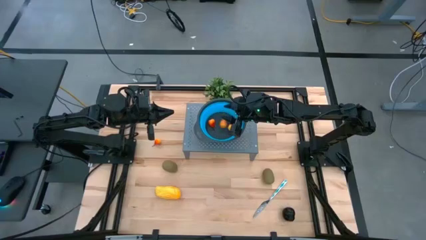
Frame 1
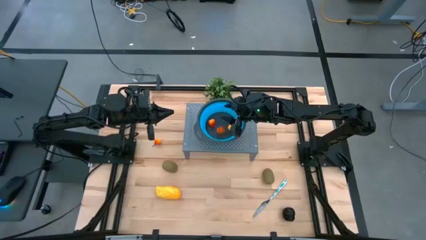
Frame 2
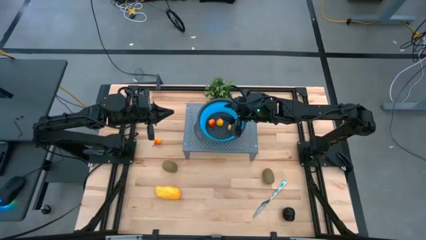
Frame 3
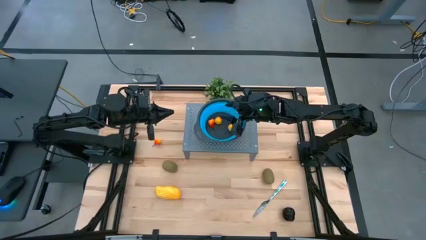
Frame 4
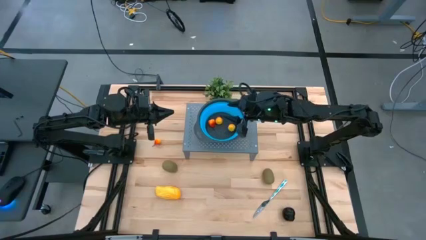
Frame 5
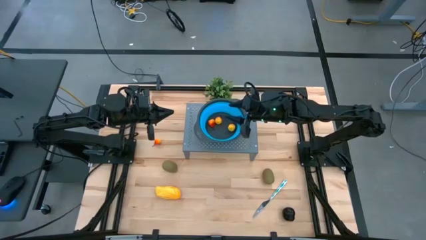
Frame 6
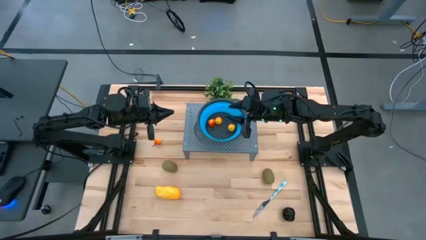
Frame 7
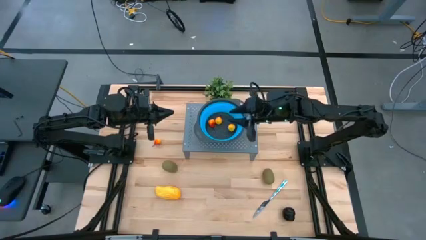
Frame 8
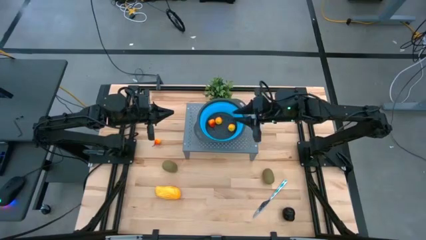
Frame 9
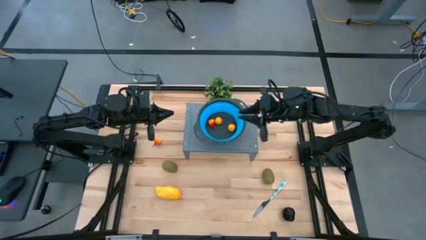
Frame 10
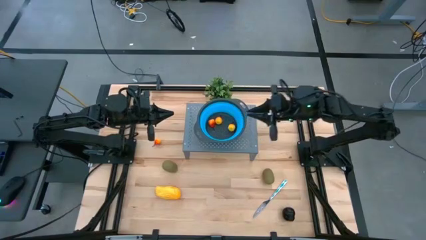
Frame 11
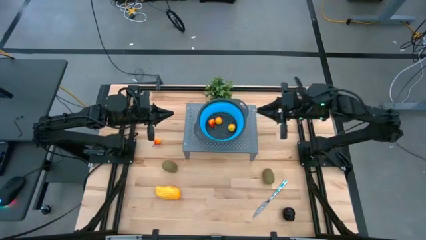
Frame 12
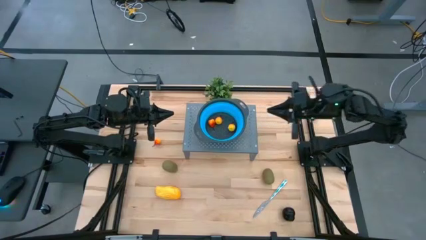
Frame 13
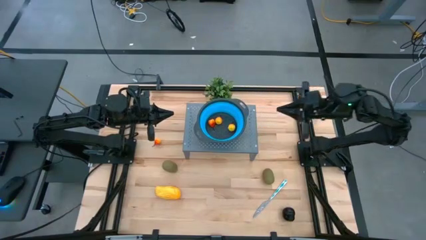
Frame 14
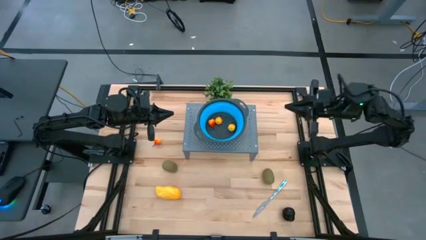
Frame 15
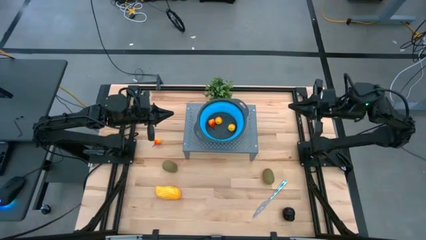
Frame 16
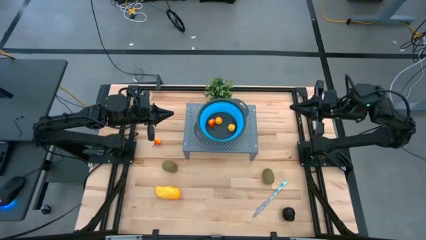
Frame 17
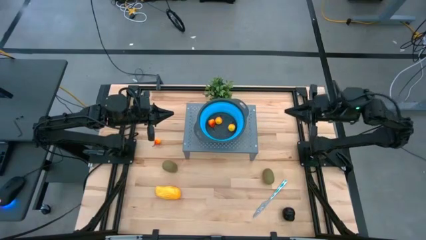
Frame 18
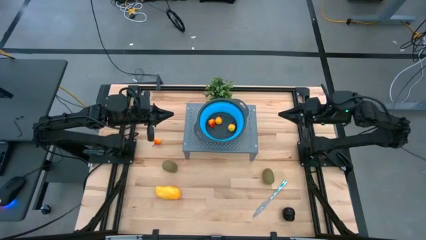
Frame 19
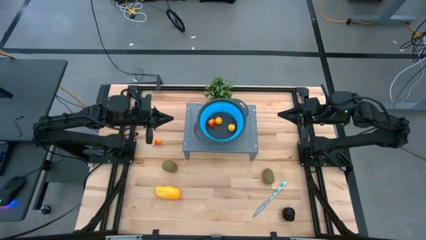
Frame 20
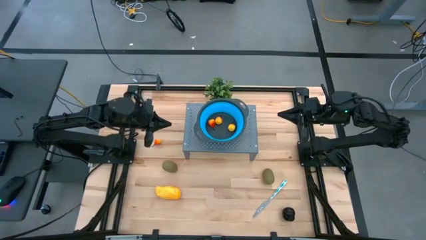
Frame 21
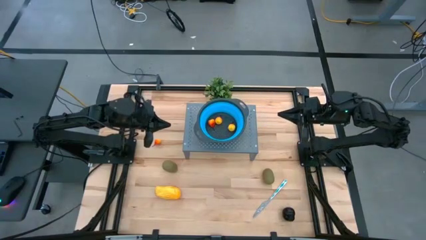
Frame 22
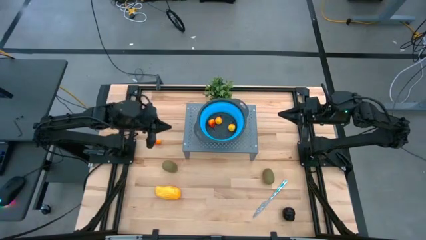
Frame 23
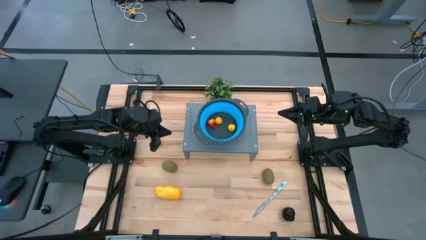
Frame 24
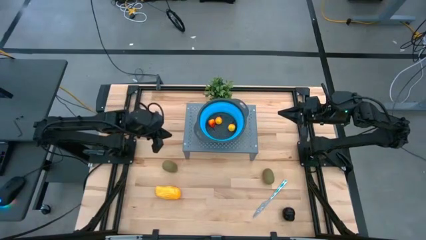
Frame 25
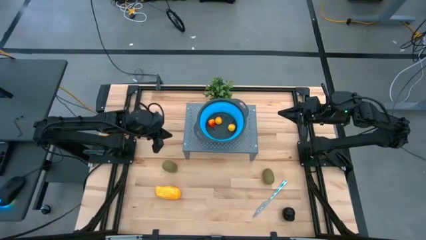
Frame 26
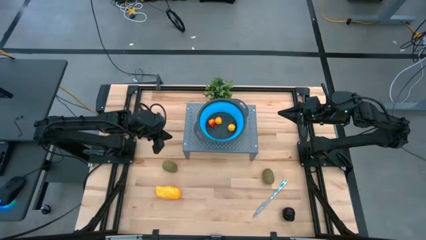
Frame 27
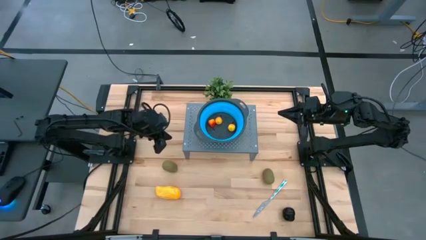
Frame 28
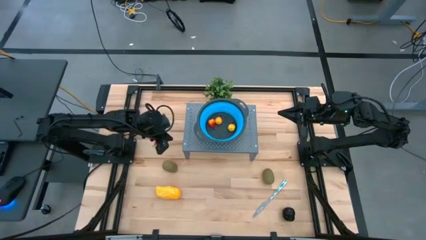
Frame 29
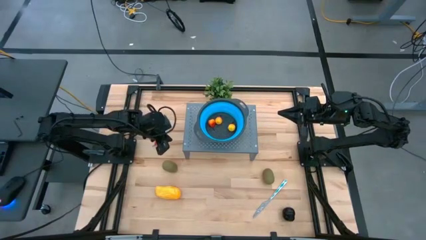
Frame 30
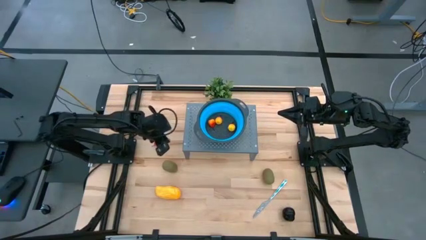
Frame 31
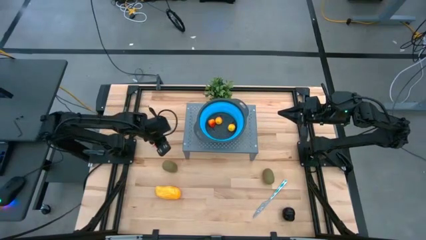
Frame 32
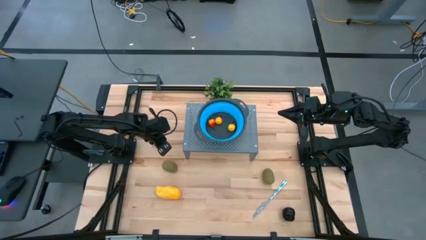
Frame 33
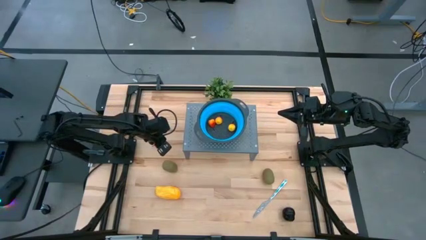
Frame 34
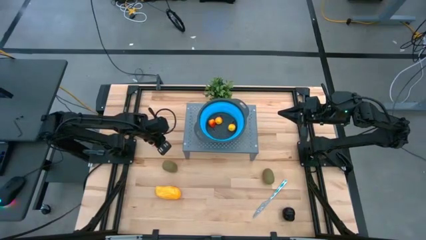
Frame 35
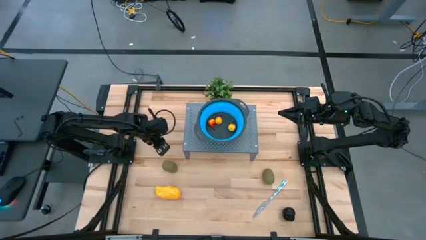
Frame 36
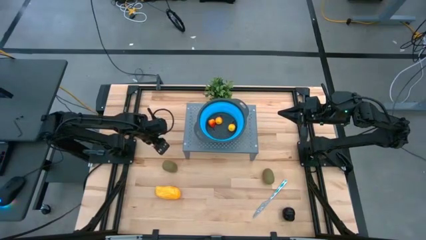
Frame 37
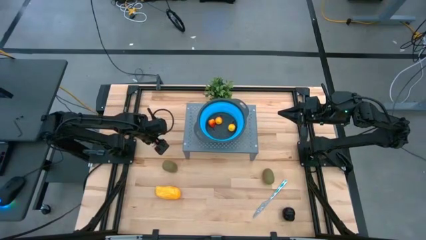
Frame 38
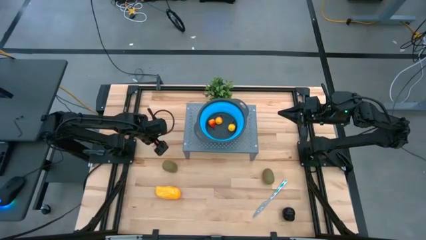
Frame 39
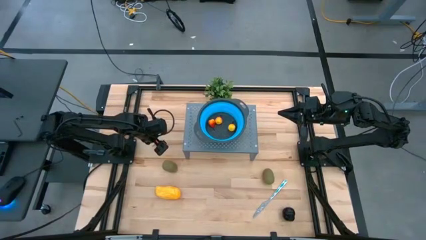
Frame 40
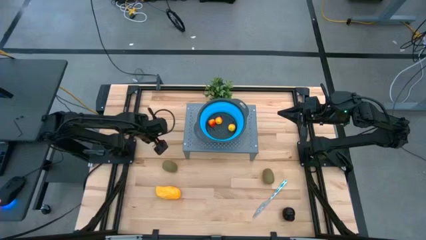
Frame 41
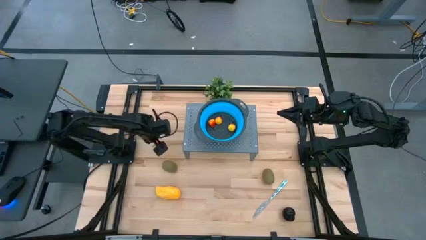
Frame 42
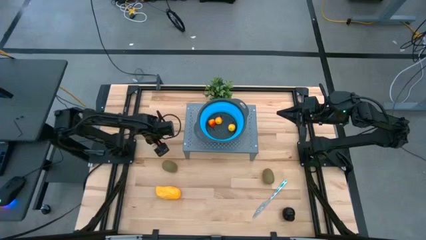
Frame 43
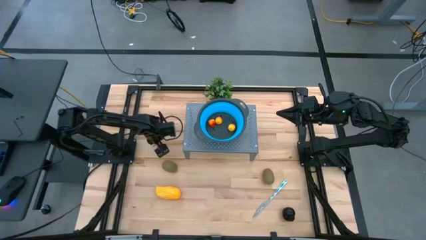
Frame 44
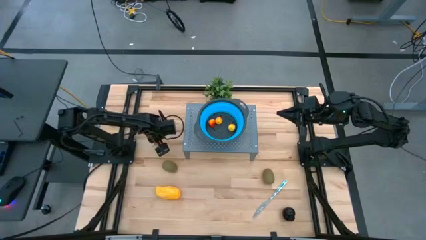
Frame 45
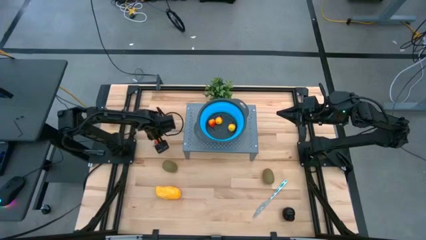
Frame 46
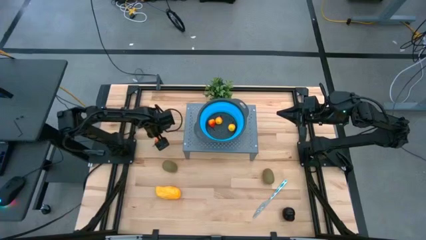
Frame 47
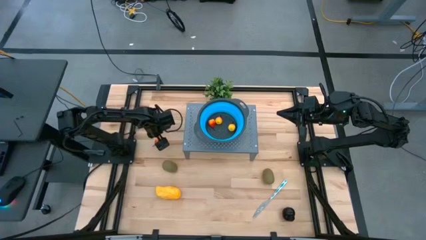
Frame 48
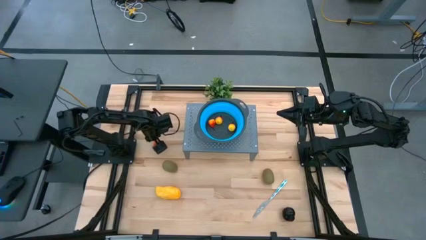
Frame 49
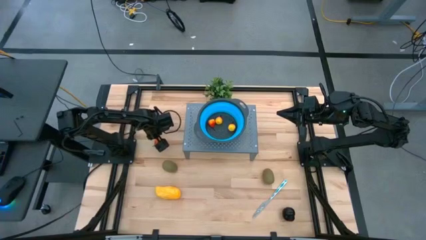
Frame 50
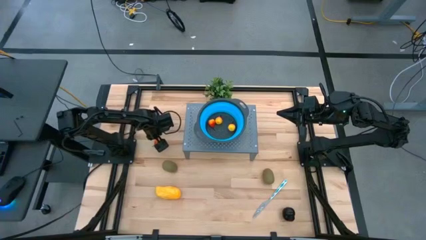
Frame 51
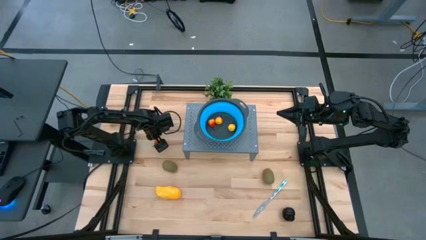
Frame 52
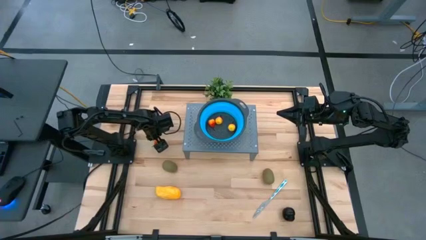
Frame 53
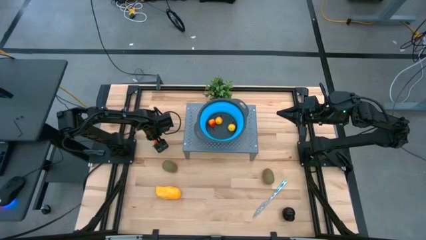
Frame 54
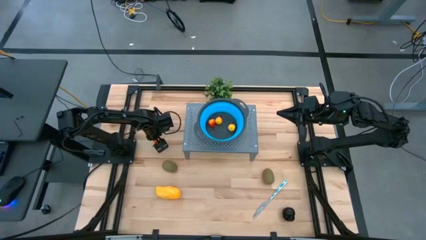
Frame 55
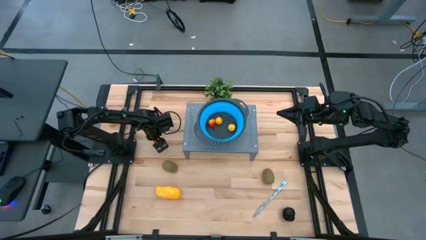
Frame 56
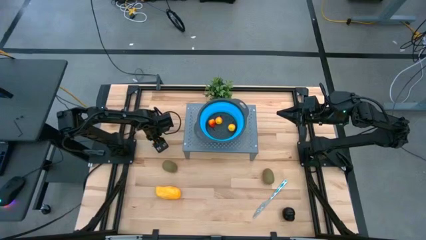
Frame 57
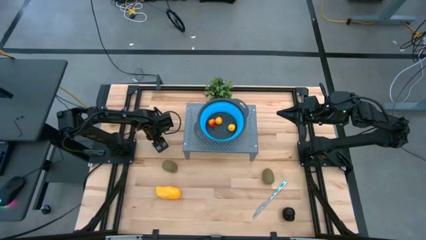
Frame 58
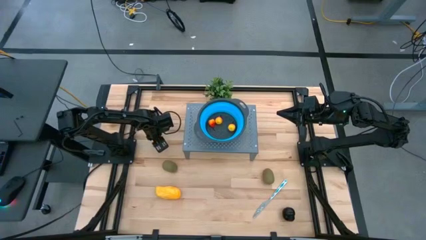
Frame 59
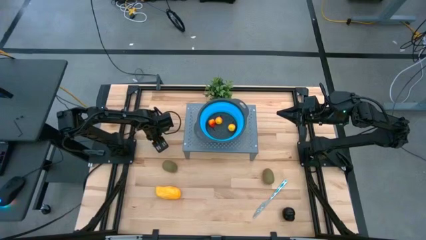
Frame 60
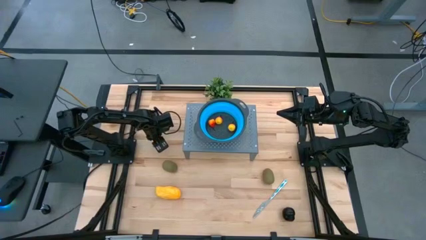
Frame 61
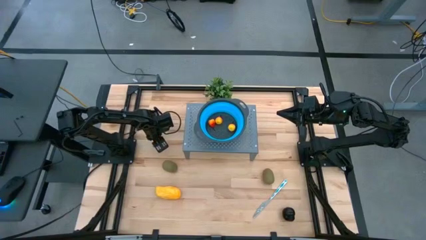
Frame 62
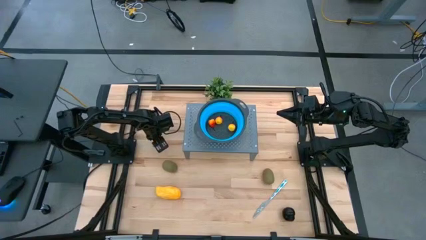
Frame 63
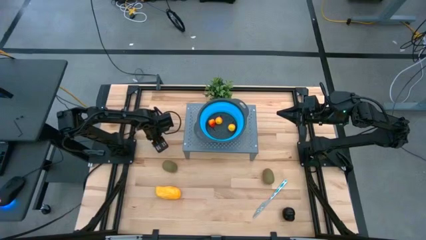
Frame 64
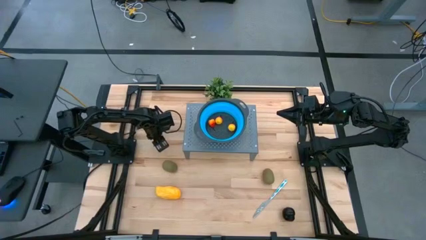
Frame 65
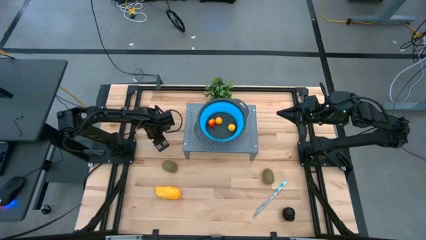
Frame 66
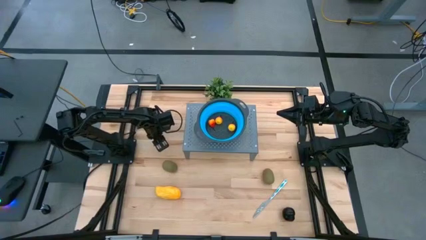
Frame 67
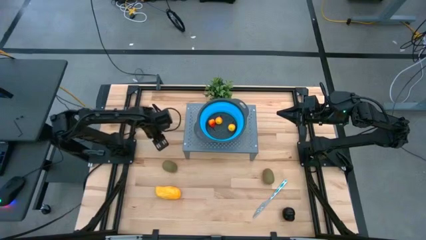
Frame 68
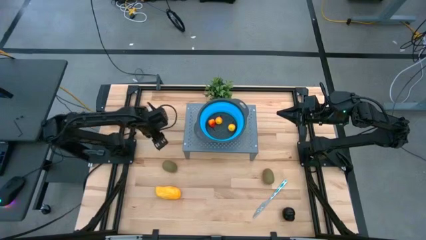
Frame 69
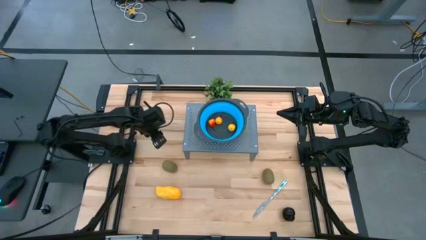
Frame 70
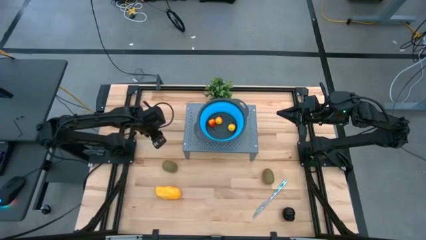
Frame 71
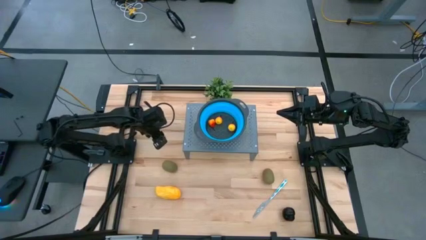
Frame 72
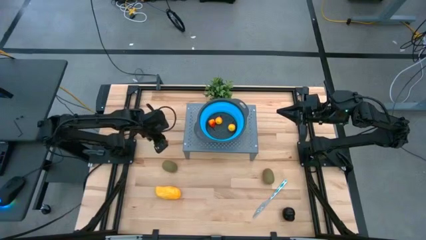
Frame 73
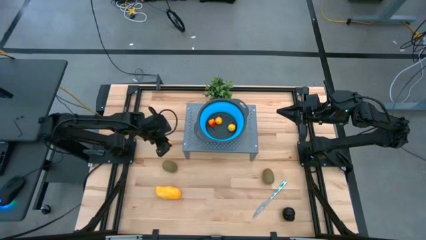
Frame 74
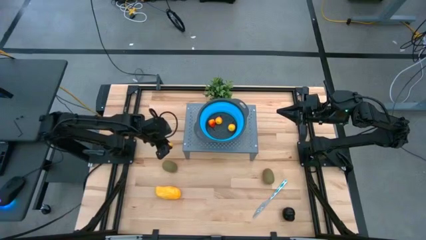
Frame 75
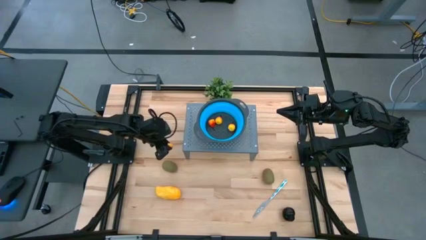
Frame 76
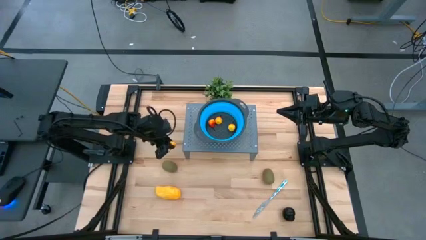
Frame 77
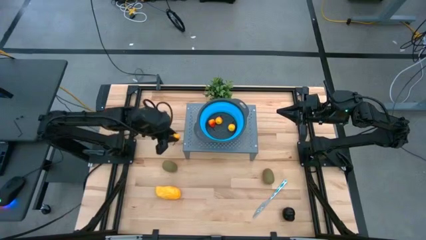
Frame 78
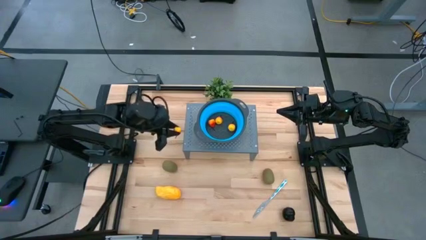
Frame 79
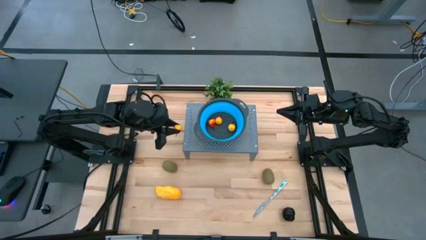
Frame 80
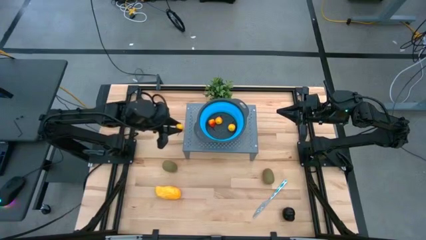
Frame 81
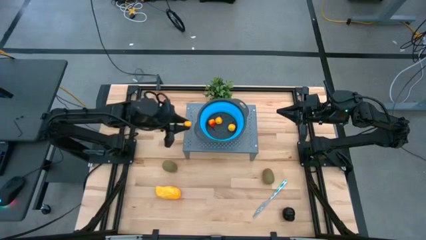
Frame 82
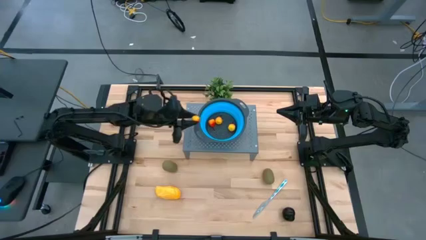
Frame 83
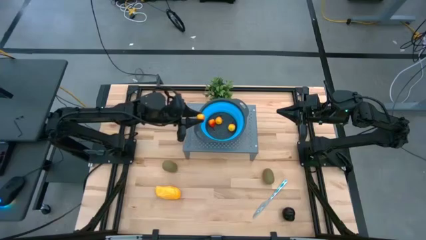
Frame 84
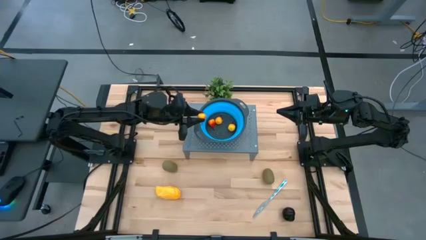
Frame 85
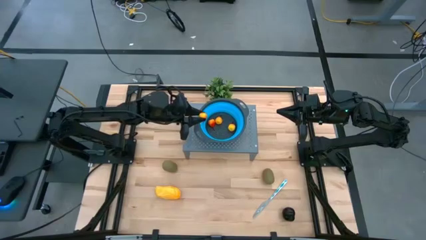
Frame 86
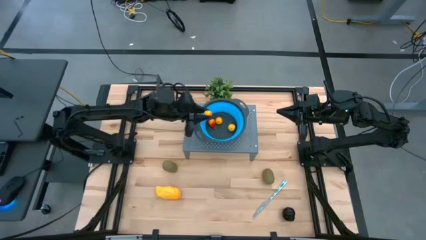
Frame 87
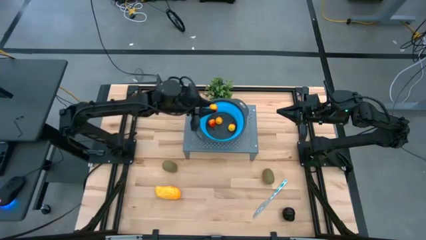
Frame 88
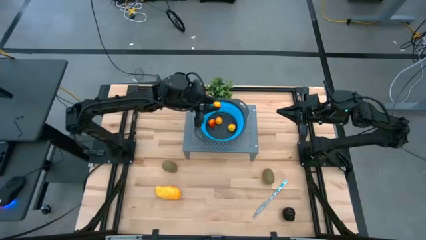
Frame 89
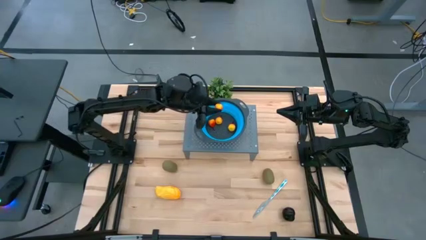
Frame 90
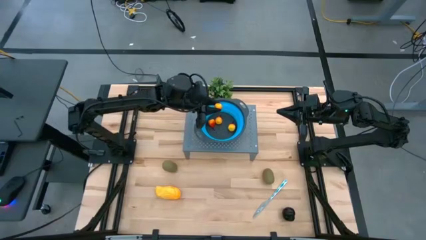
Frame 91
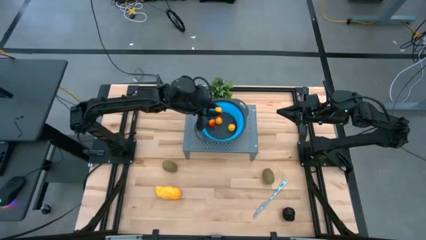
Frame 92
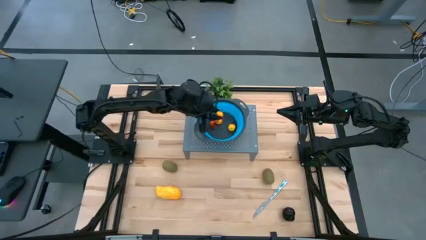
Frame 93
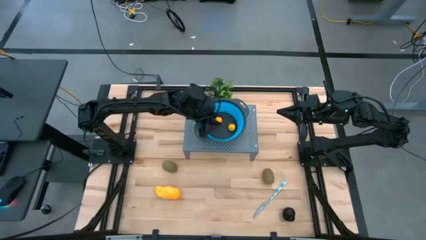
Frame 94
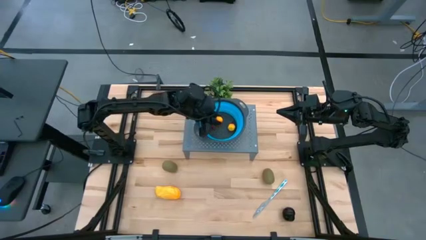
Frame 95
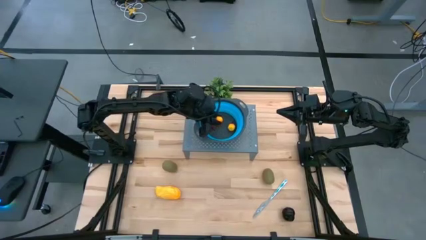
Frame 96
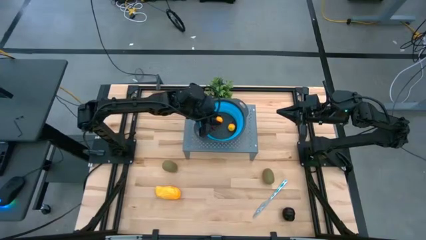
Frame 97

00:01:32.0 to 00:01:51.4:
Task: Pick & Place Fruit
Put the orange pear into the strainer bowl on the shelf
